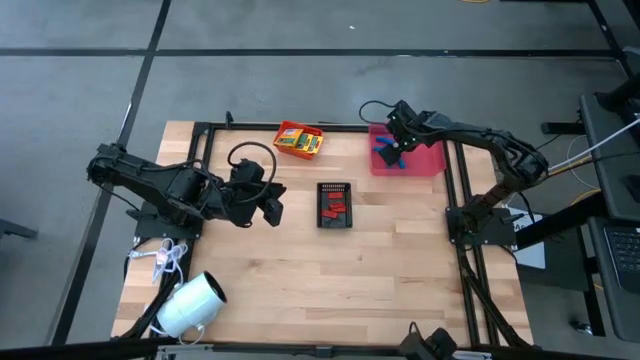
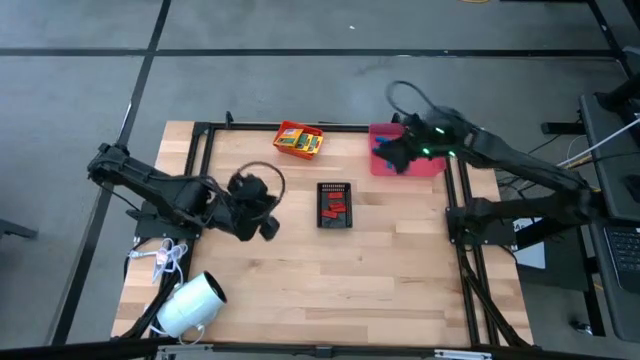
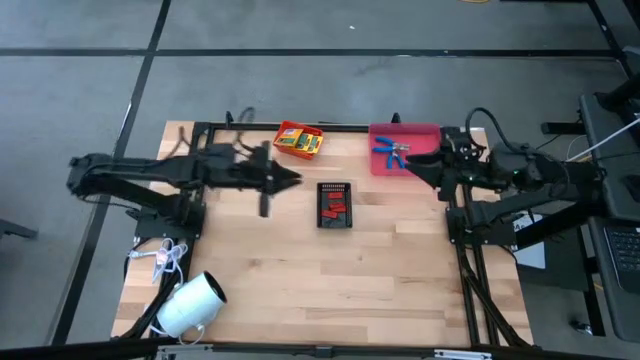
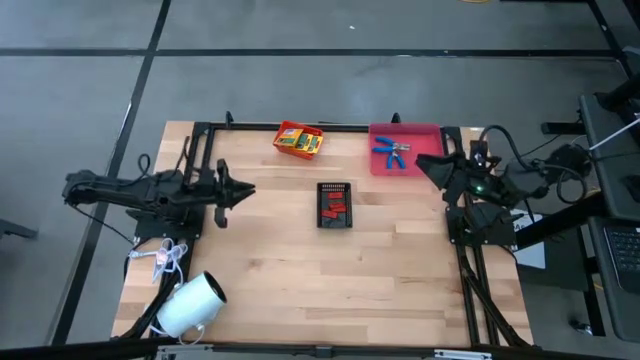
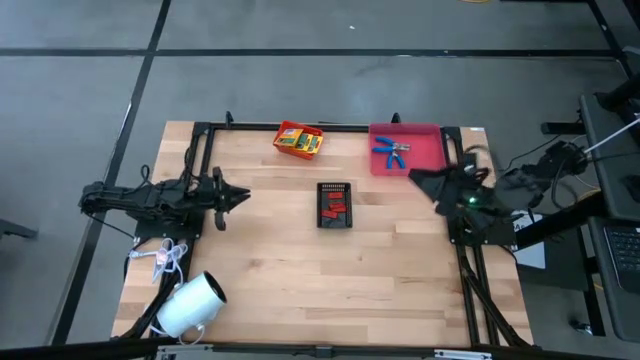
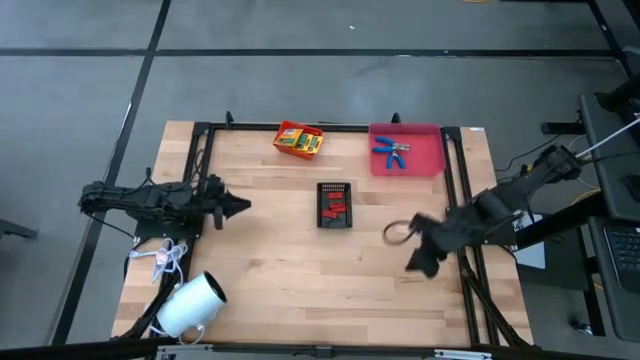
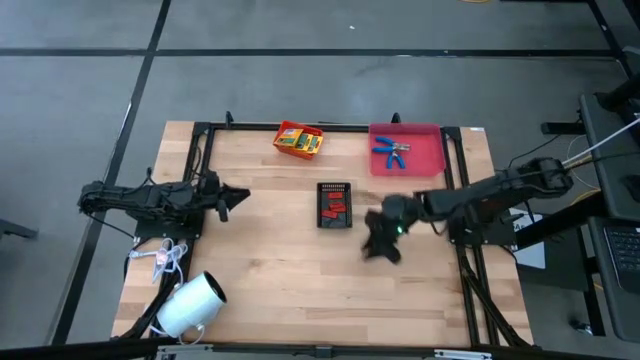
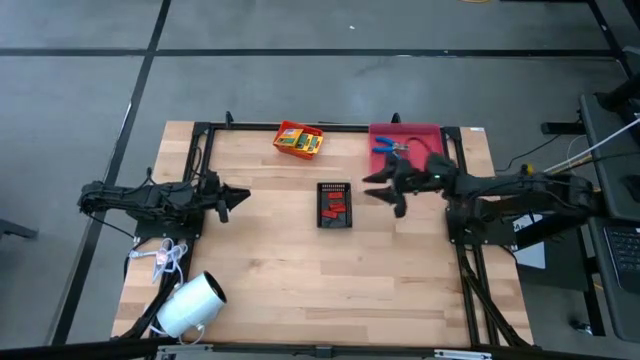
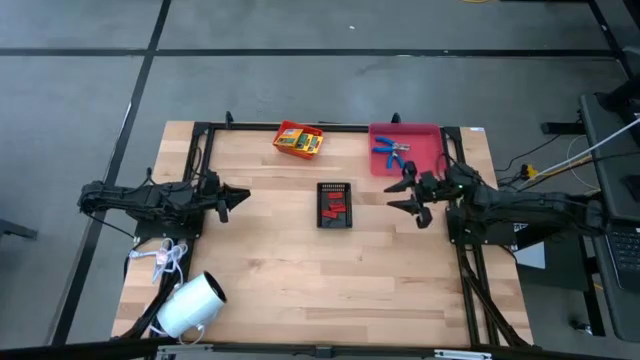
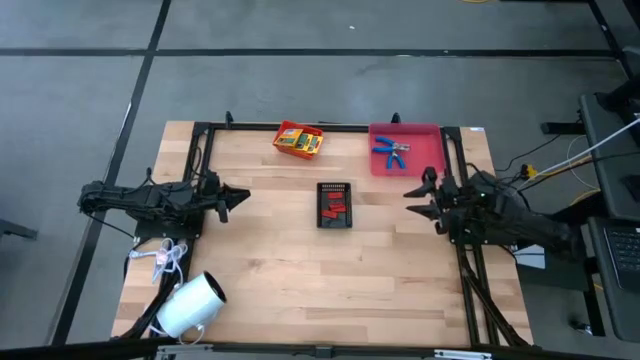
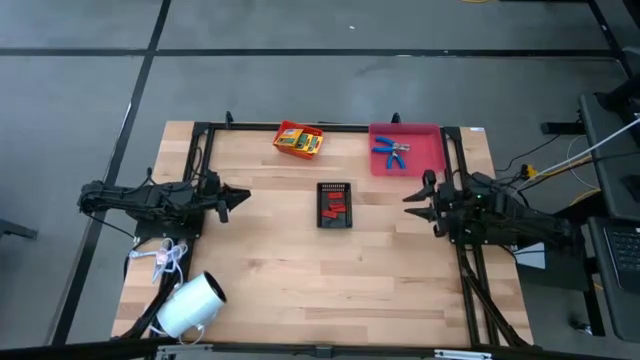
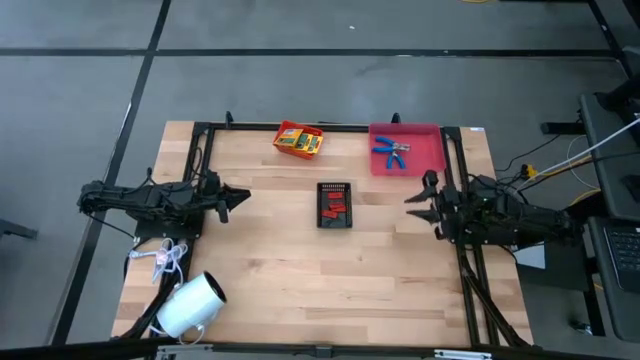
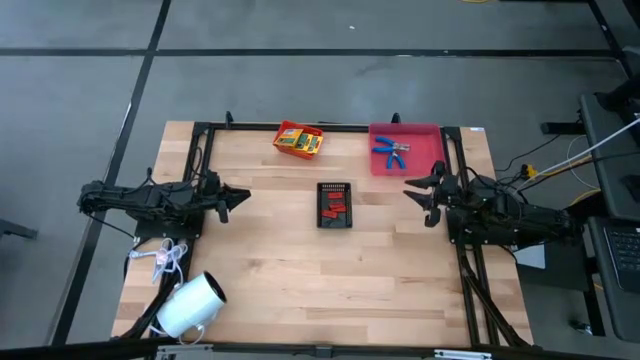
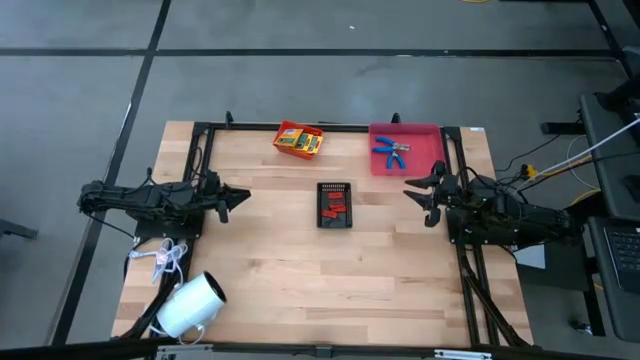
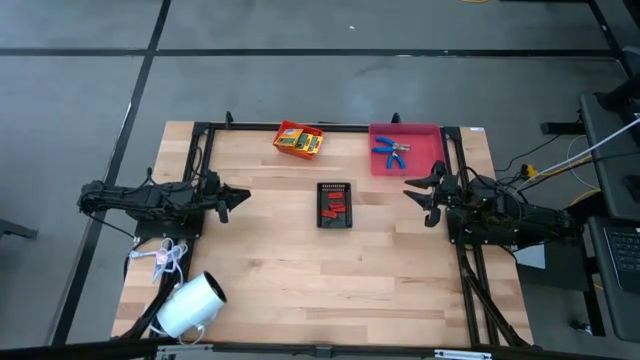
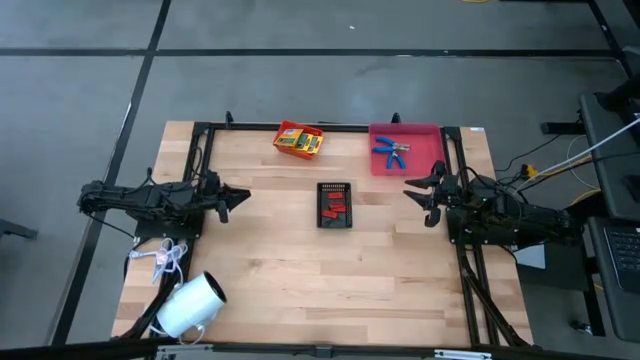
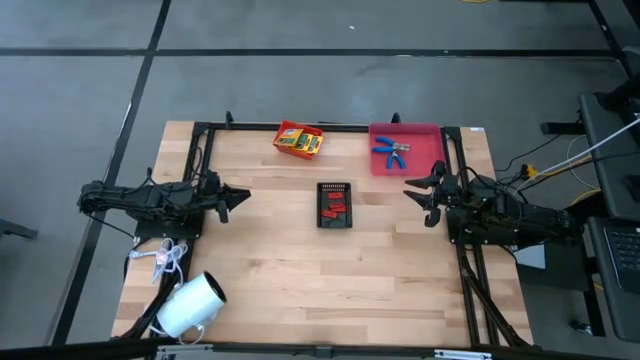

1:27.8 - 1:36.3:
Task: Pick & Place School Supplies
Return to Home Position

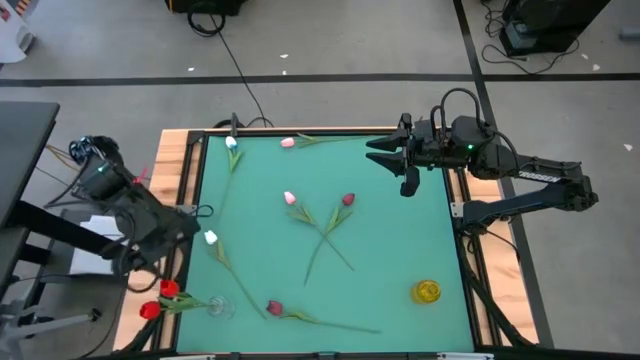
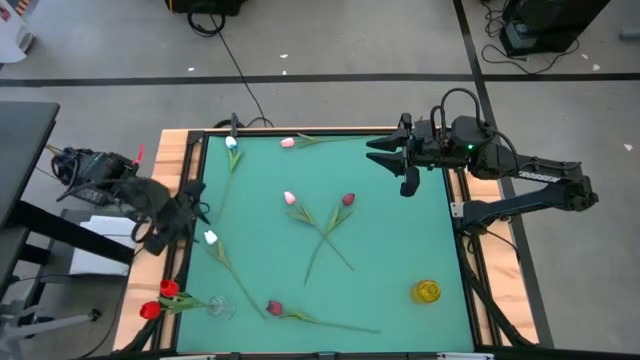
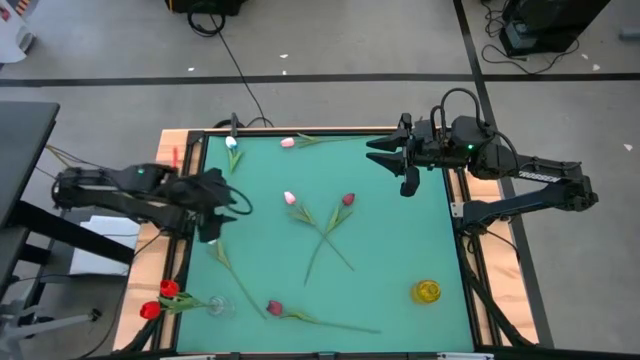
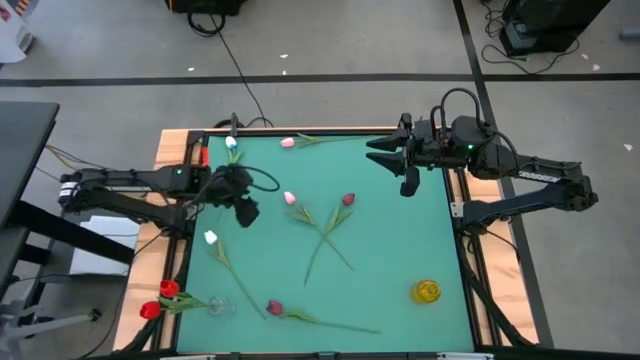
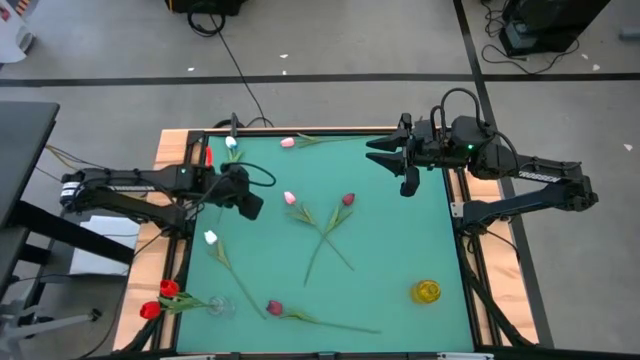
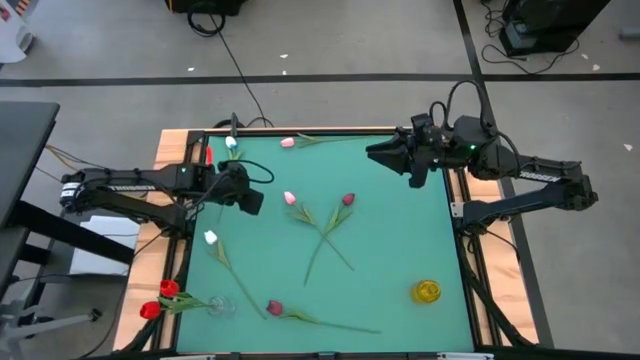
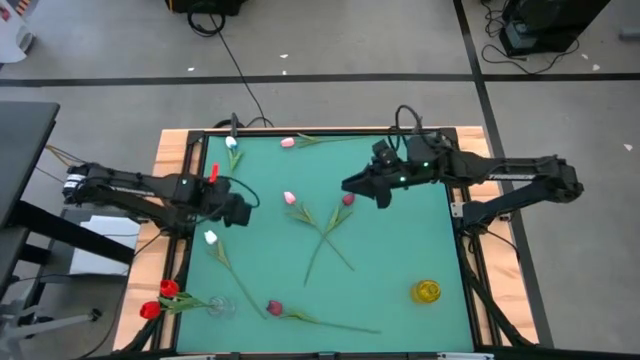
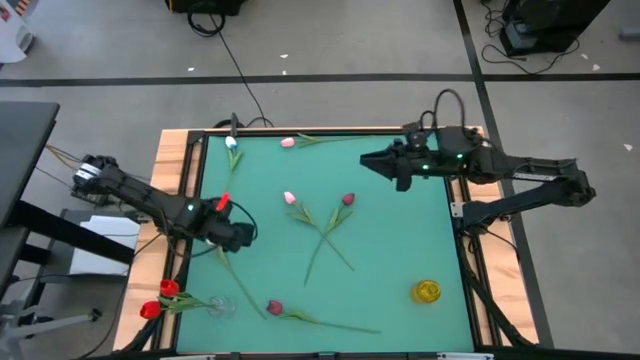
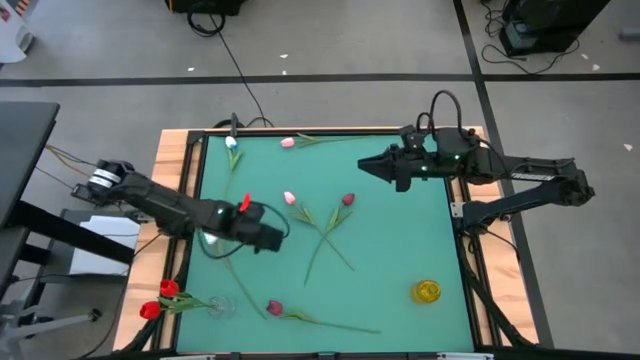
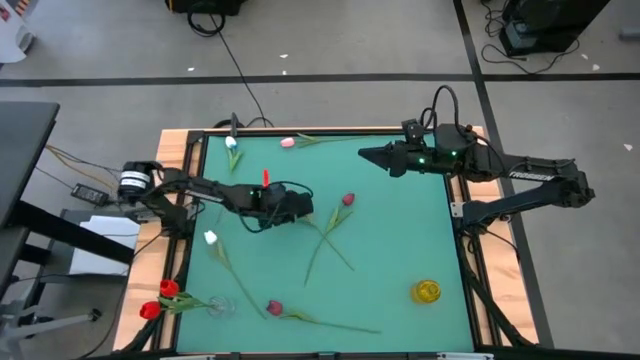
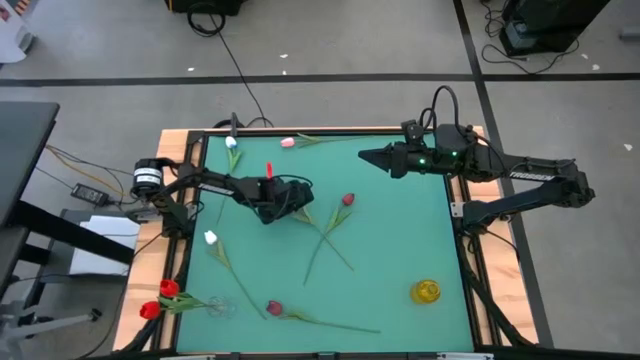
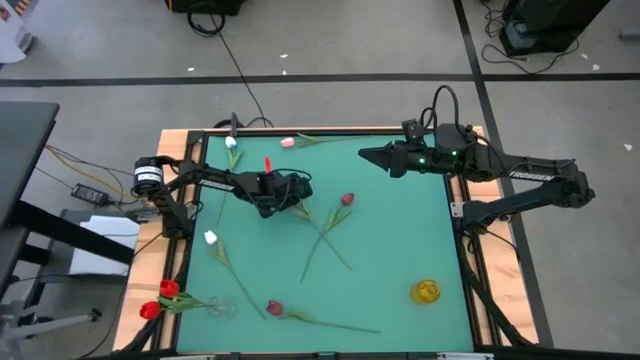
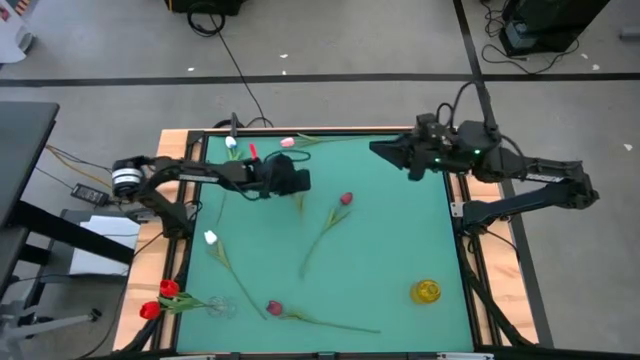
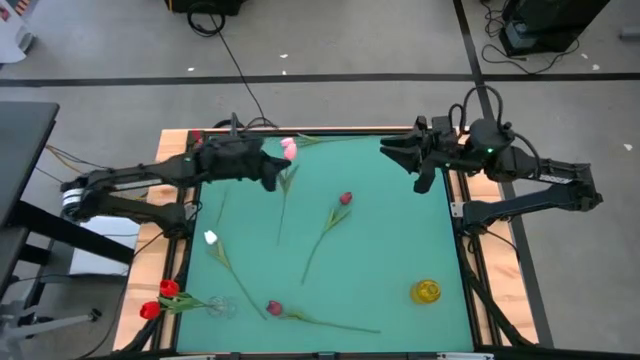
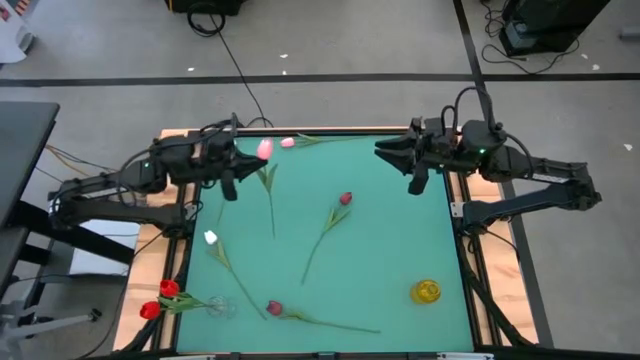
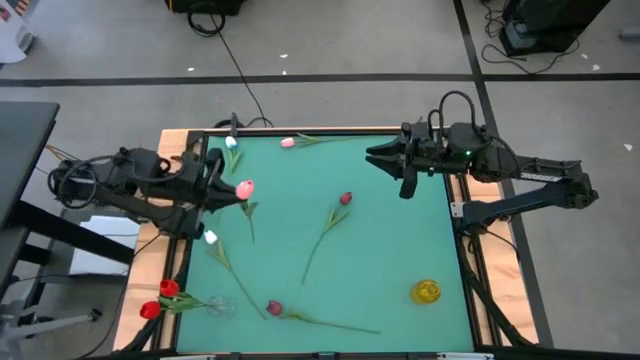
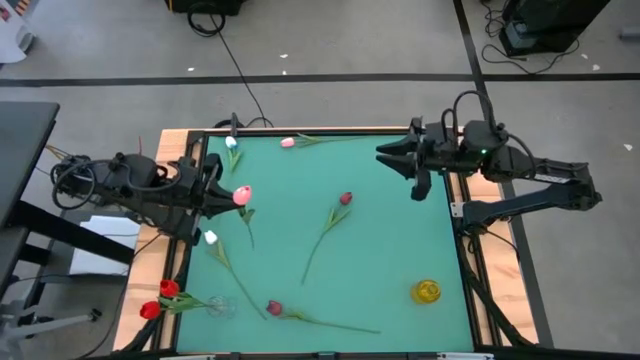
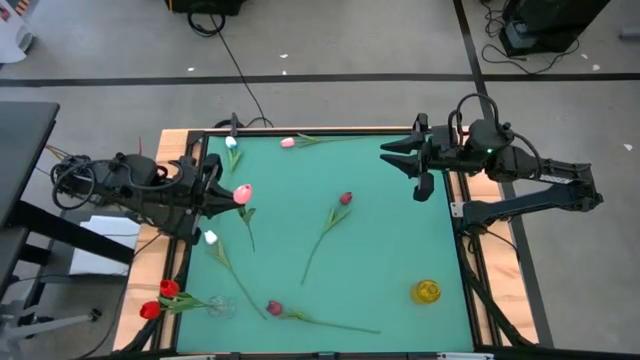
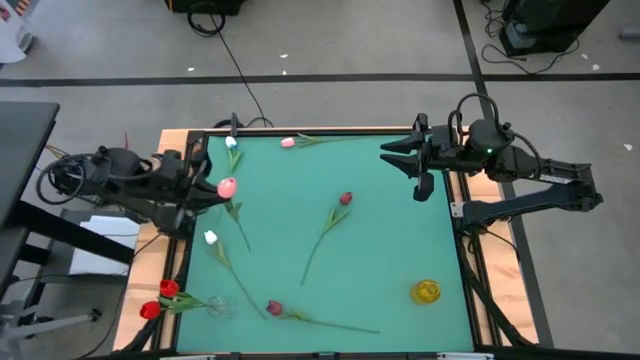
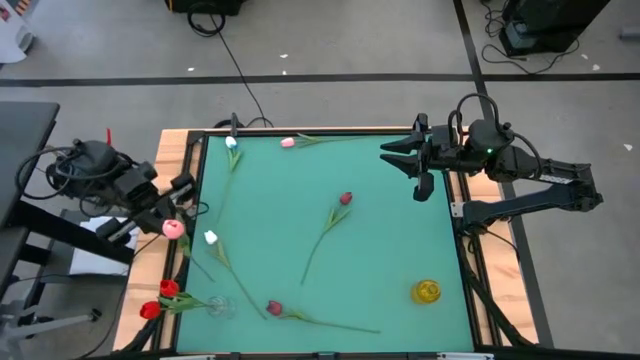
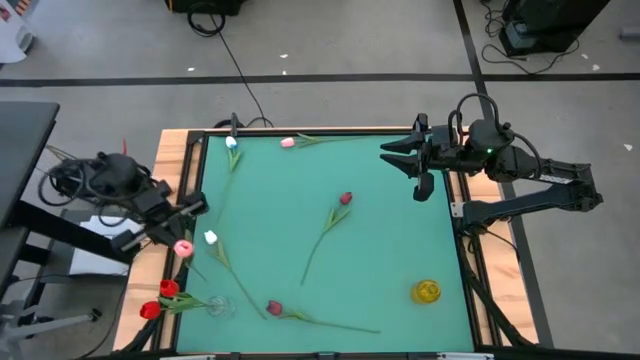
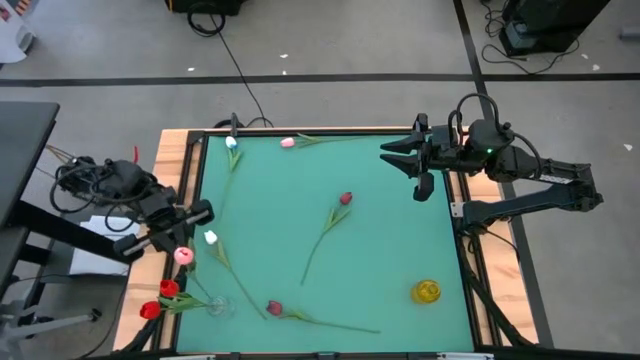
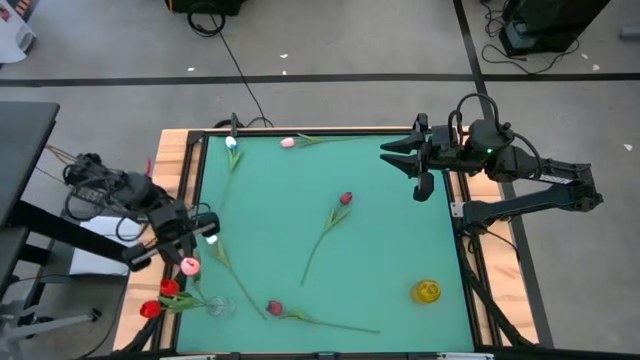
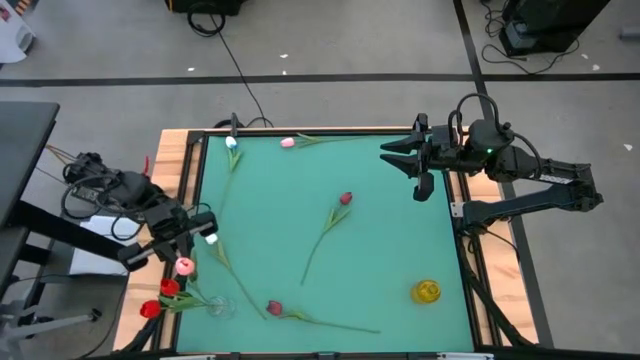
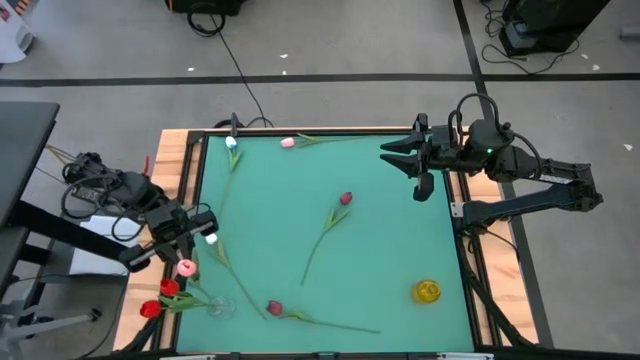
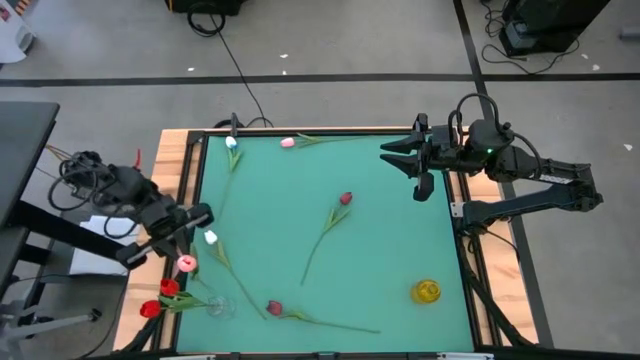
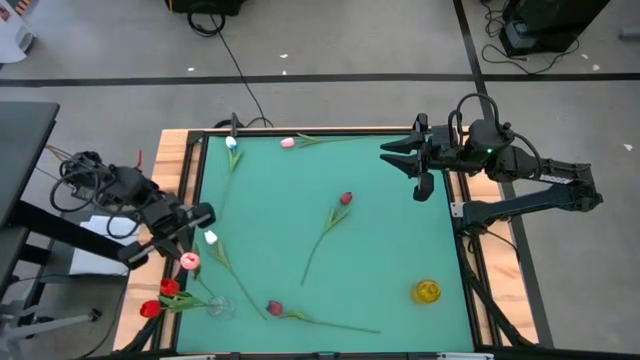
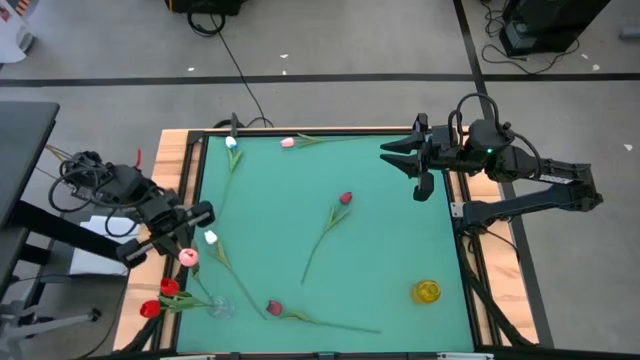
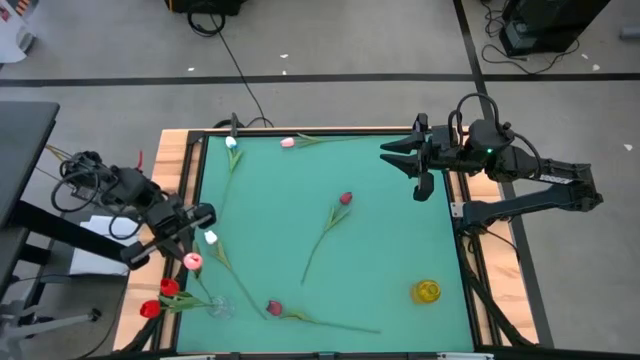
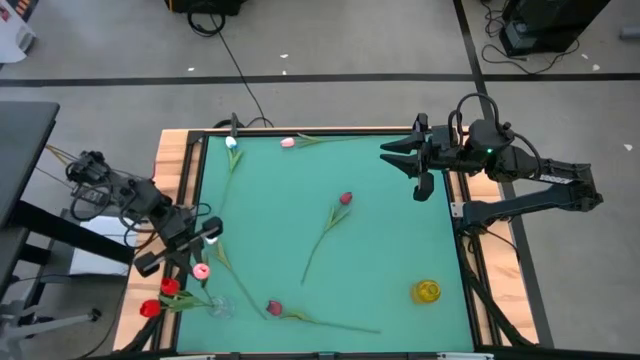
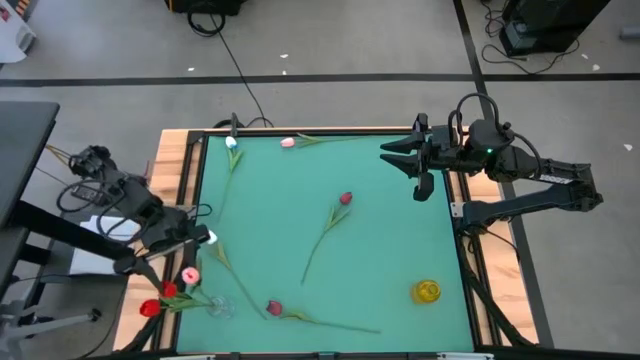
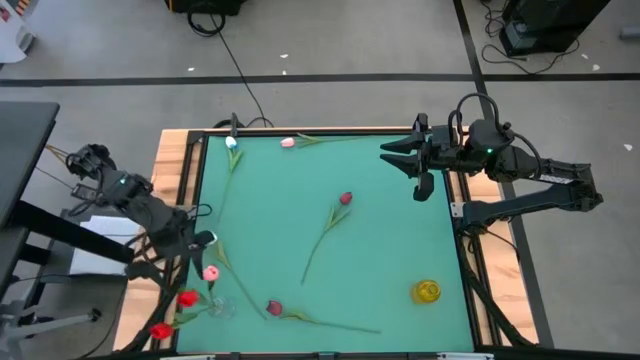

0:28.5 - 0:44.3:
Task: Sort flowers into vase by color
Put the bottom pink tulip into the white transparent vase
